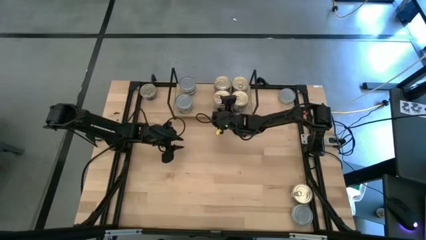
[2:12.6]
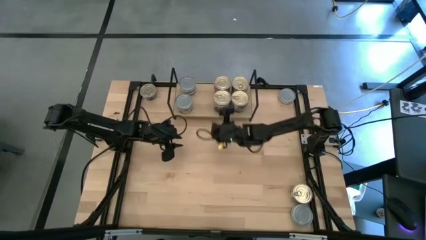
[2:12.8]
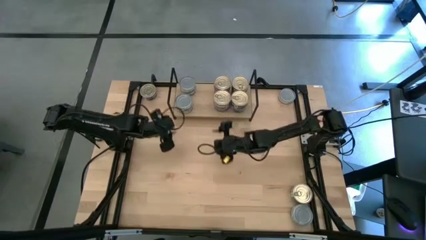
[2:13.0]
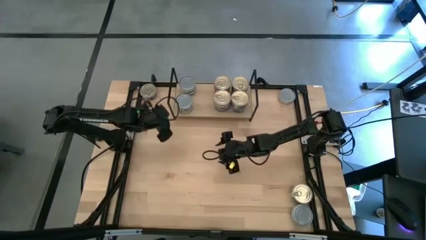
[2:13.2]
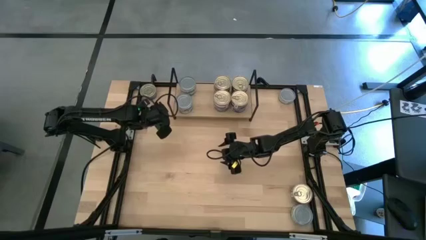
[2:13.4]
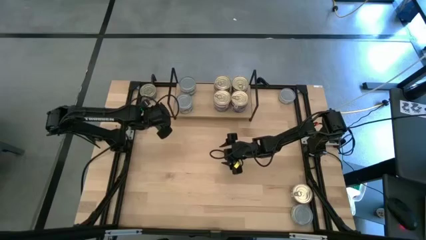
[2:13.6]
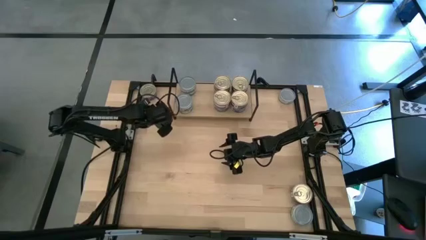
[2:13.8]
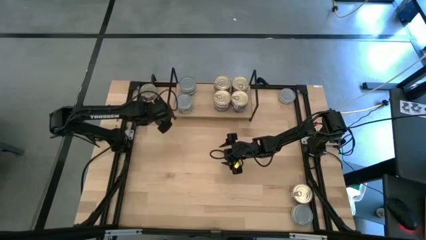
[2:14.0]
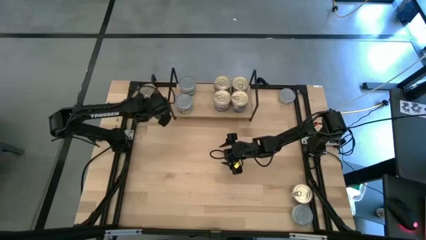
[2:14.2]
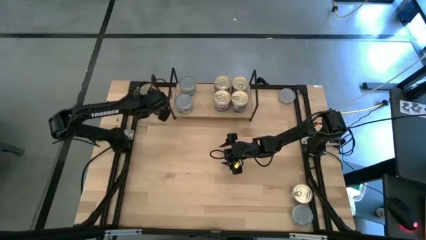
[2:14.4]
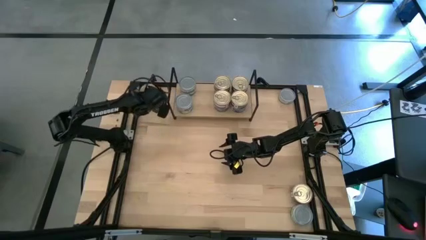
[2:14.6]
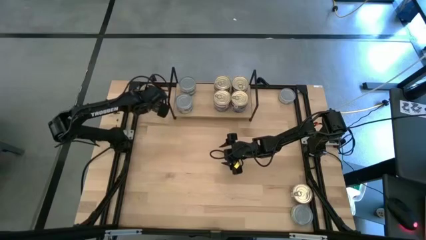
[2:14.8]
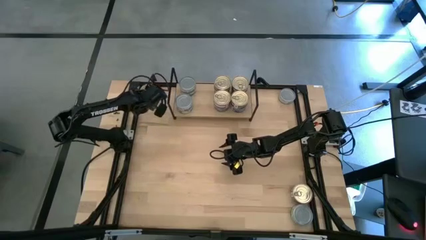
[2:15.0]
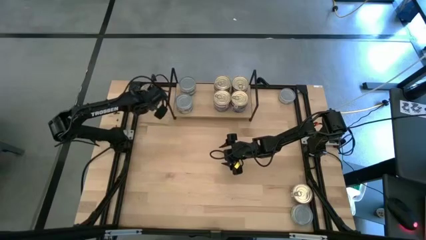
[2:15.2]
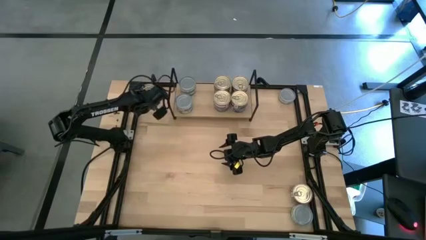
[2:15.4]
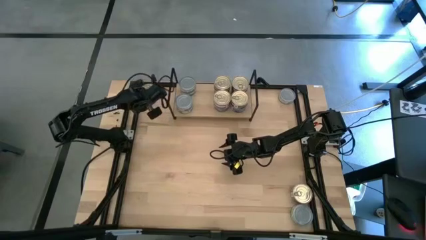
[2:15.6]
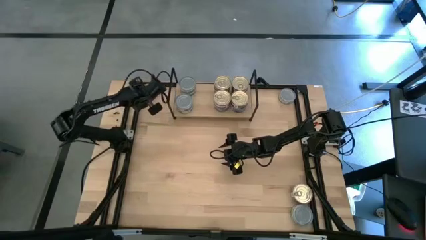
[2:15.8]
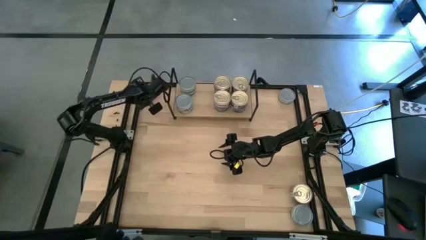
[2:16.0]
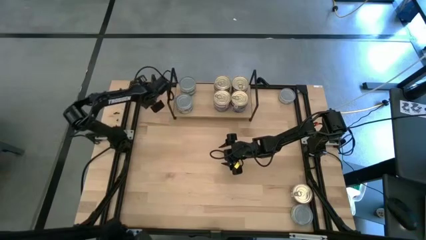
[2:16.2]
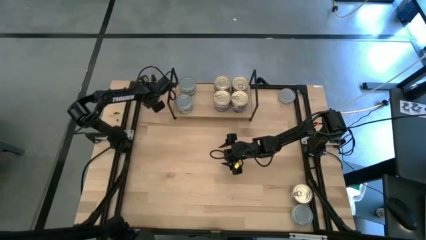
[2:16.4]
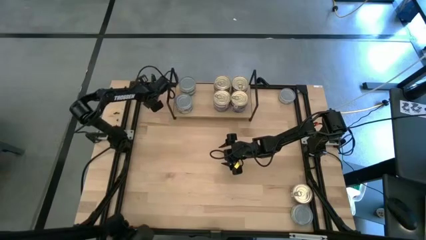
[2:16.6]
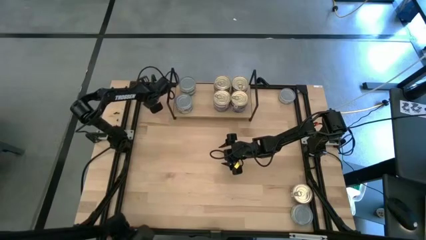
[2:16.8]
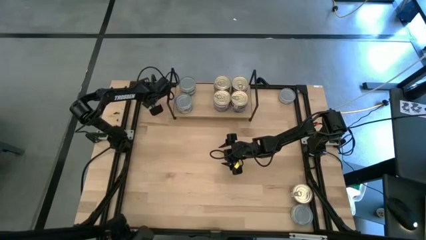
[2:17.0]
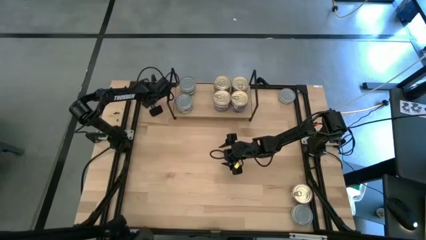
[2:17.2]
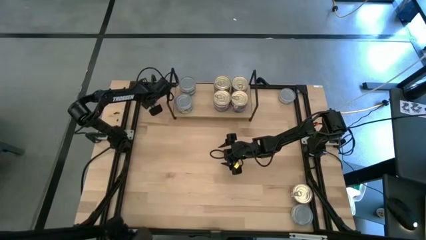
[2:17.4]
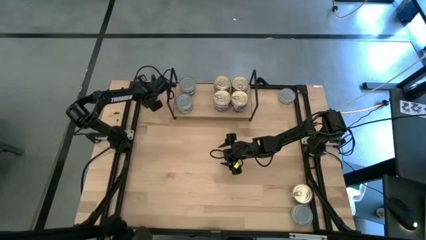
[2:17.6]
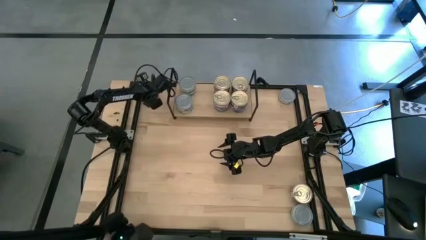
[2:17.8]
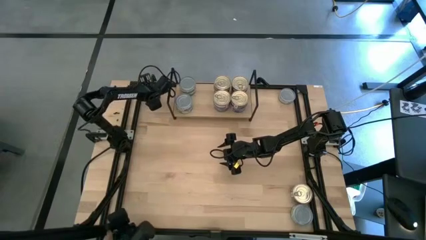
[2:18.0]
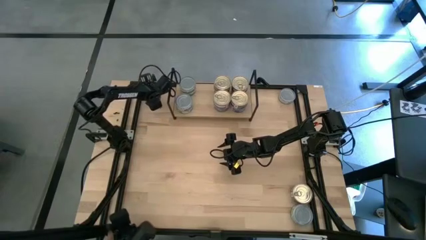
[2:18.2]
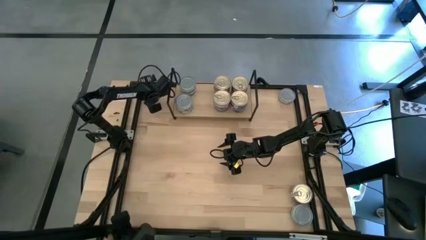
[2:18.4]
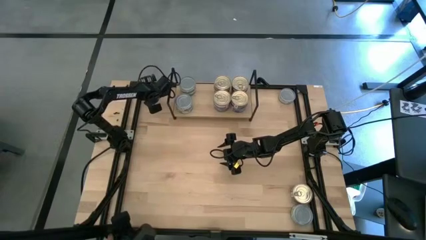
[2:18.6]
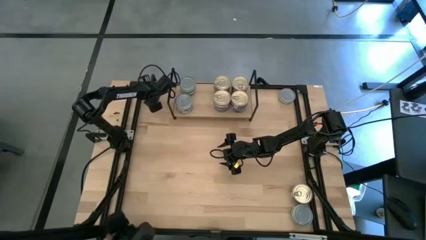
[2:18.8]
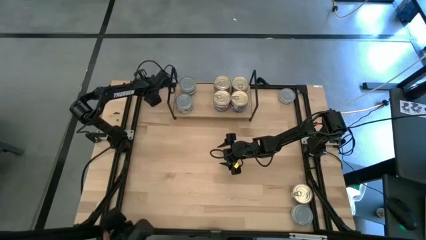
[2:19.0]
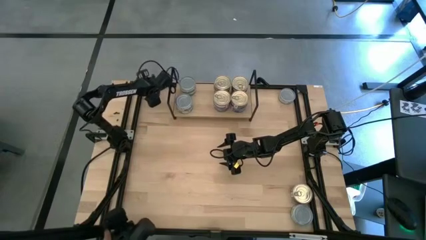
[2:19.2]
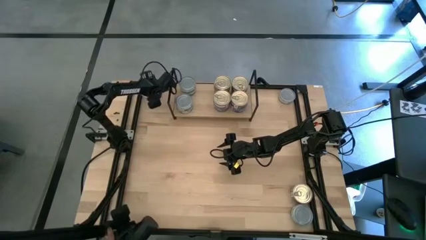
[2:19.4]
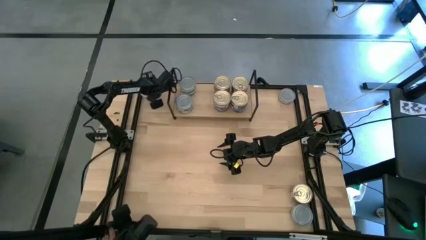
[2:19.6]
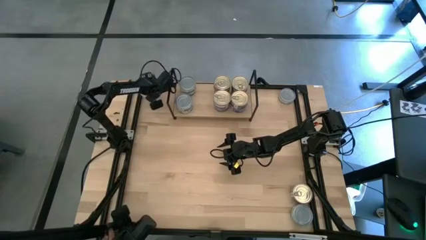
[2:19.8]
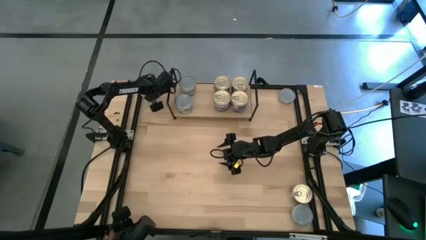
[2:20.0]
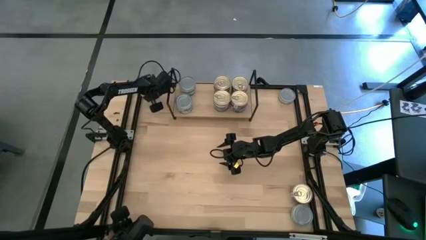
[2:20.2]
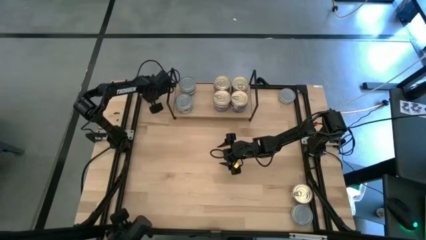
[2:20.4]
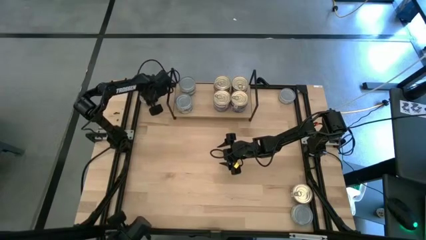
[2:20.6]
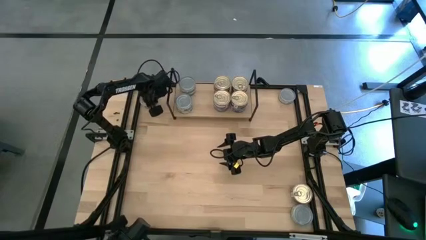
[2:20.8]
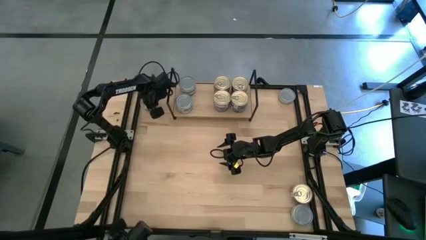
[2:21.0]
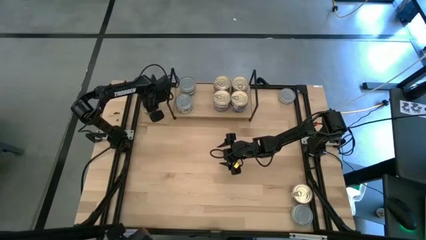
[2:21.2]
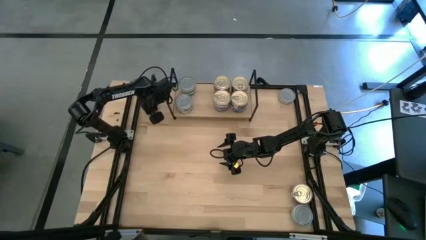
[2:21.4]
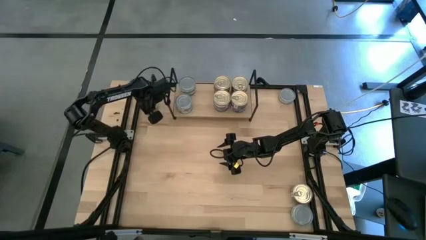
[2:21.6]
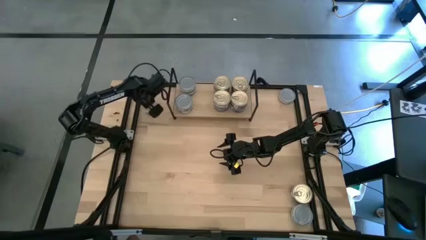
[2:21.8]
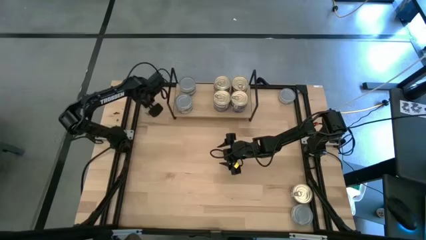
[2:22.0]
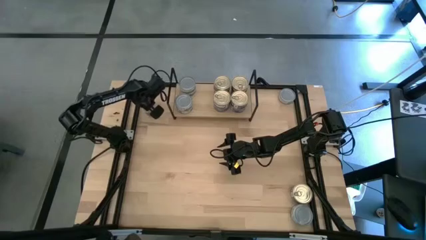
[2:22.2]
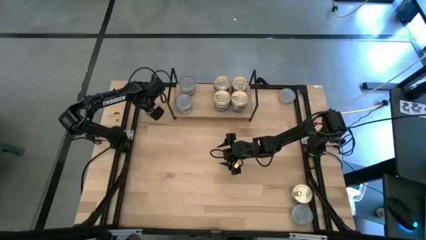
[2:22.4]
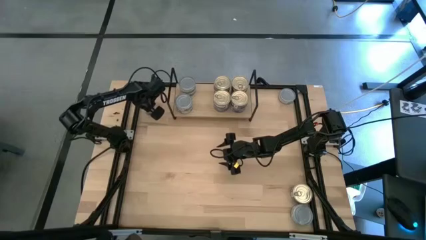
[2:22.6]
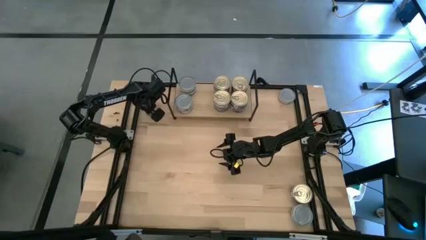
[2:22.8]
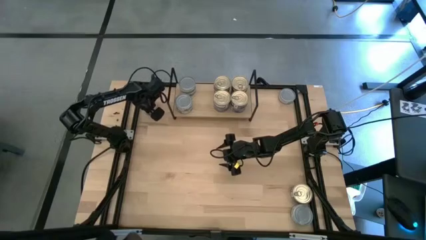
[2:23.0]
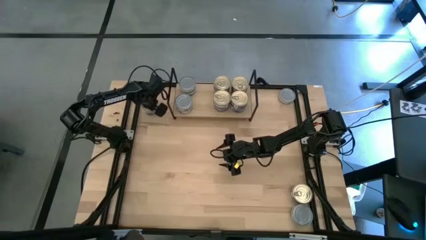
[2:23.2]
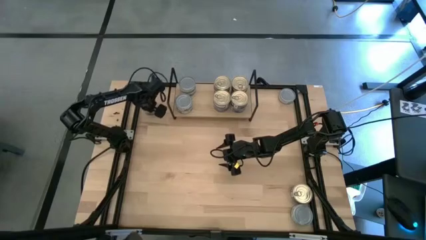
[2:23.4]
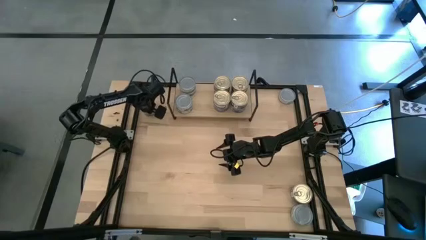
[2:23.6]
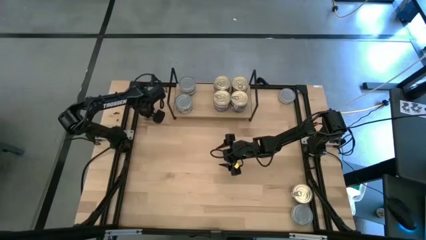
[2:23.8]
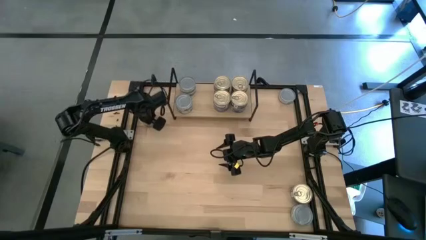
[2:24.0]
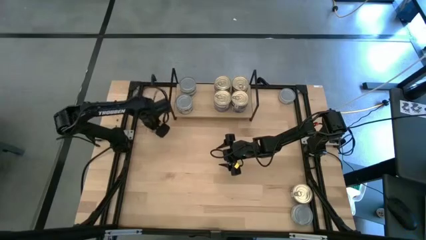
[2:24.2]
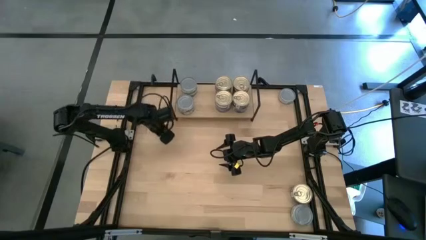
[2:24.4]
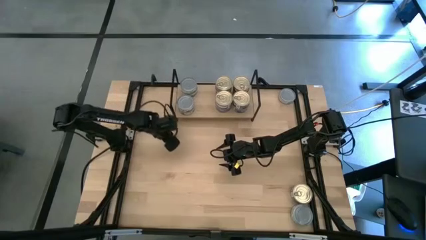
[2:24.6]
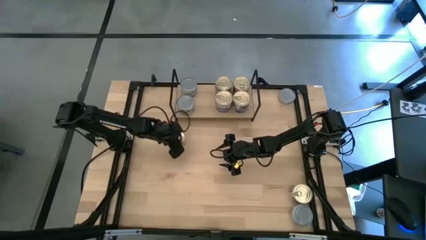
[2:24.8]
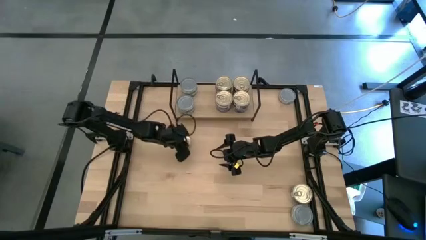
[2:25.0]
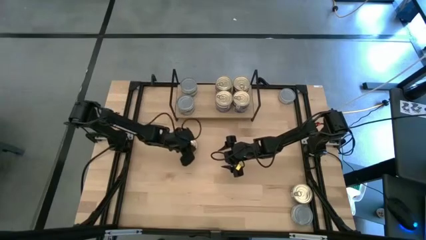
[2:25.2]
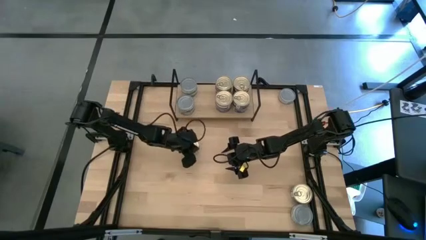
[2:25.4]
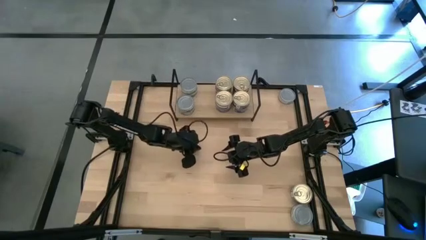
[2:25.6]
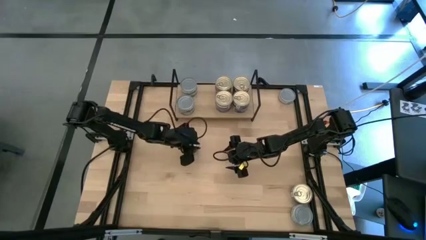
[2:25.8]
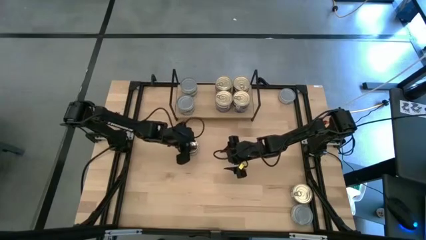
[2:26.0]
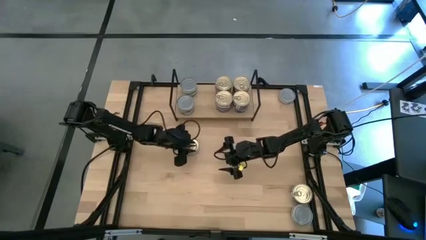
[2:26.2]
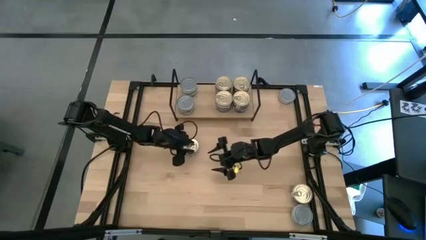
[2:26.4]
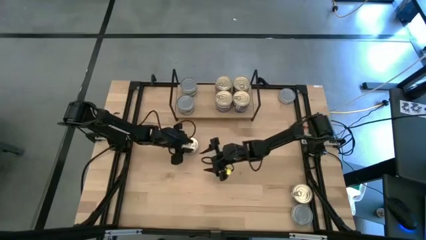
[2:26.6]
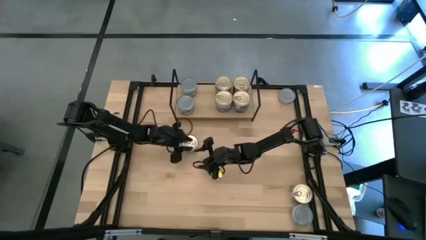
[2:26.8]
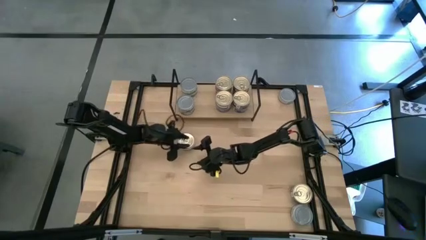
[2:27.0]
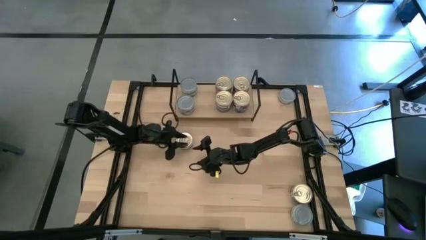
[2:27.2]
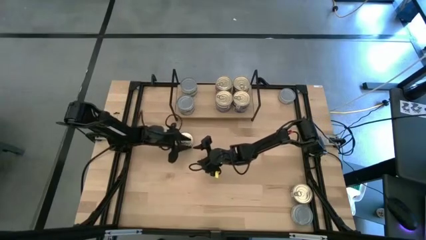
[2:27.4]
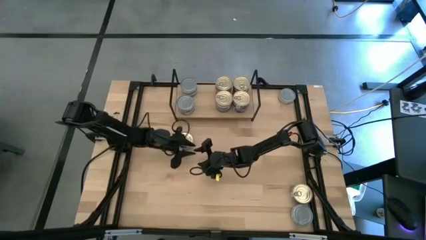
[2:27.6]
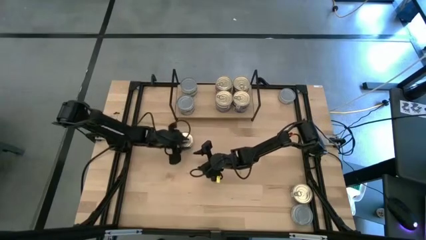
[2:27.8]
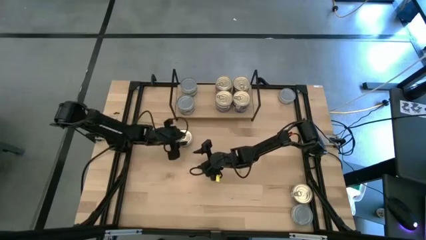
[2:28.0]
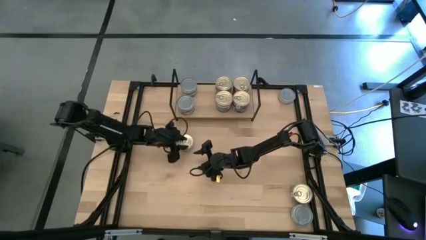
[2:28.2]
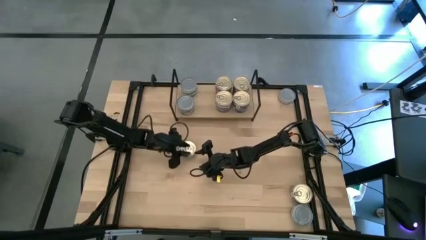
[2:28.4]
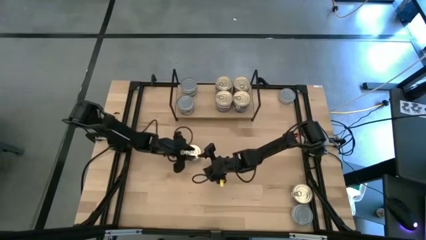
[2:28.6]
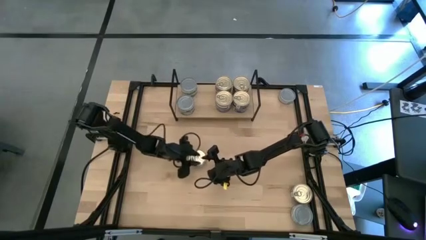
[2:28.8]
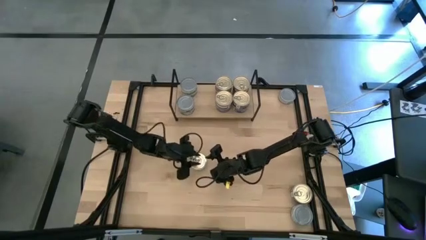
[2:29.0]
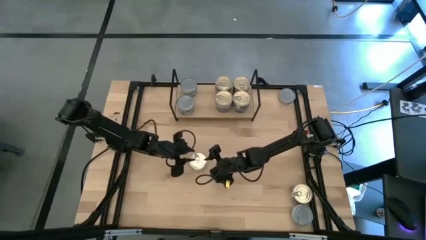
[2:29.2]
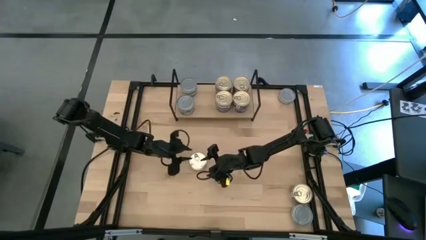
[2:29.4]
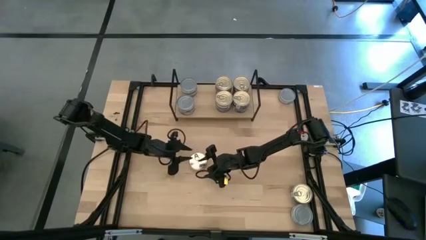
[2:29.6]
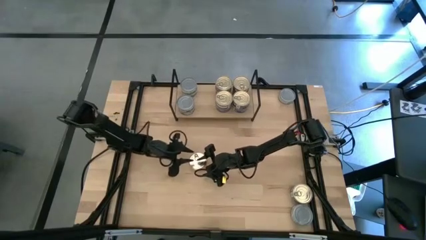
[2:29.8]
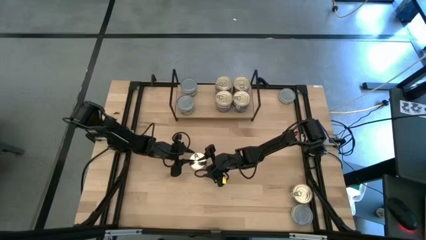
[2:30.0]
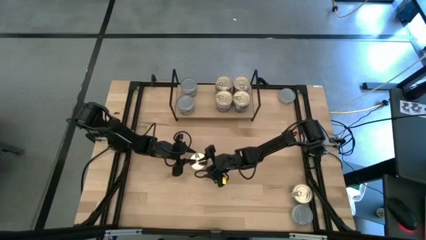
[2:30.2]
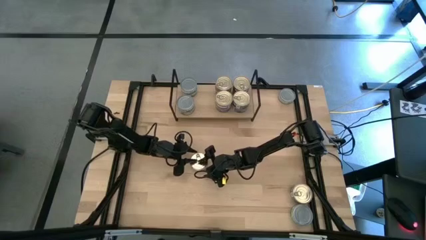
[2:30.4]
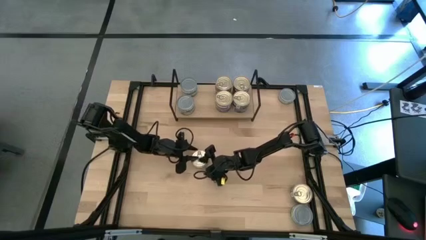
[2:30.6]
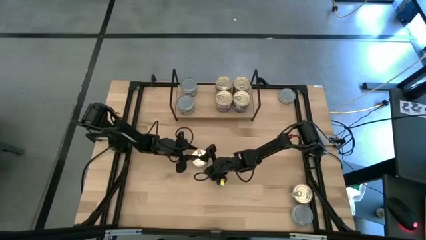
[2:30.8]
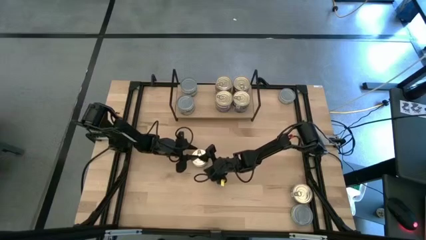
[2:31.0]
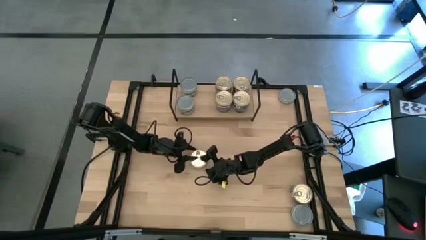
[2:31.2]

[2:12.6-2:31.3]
Task: Stack canned seafood by type on shelf
Put the blue and pink tuna can on the shelf
